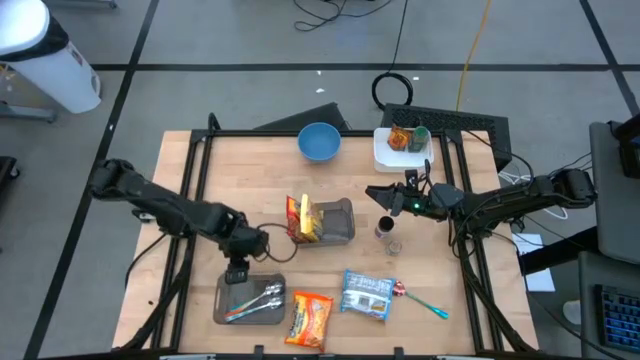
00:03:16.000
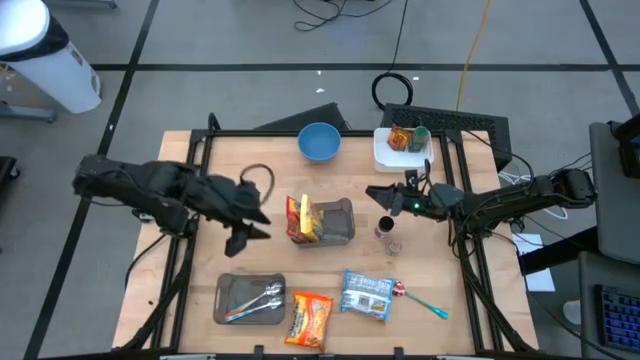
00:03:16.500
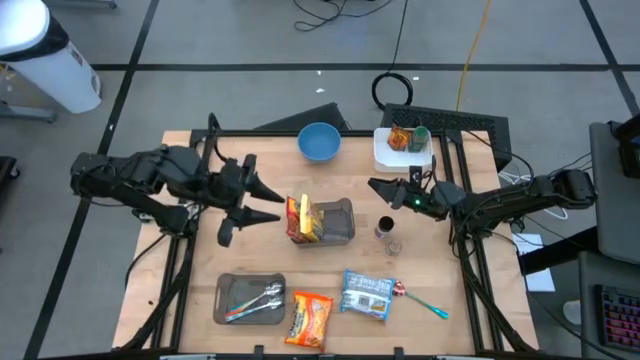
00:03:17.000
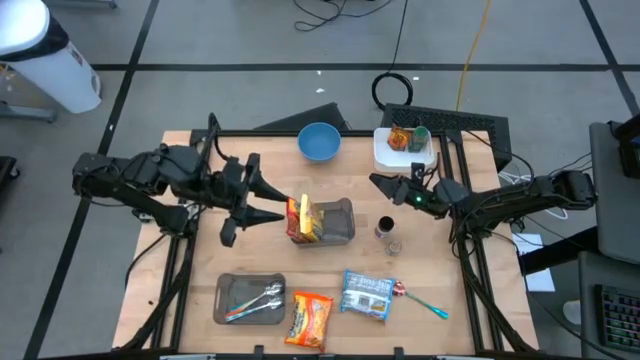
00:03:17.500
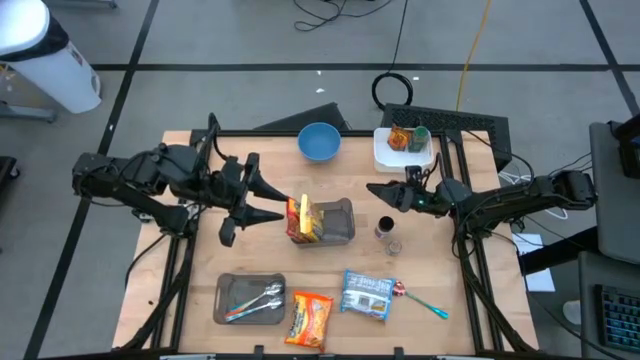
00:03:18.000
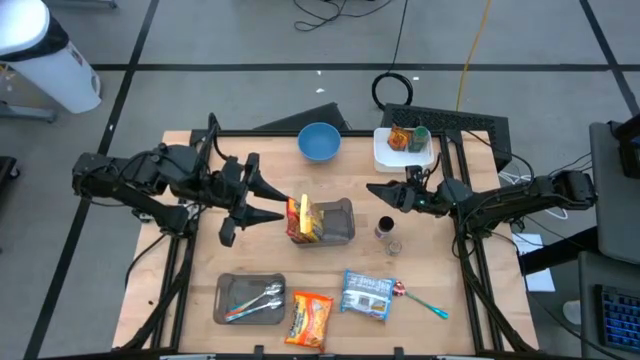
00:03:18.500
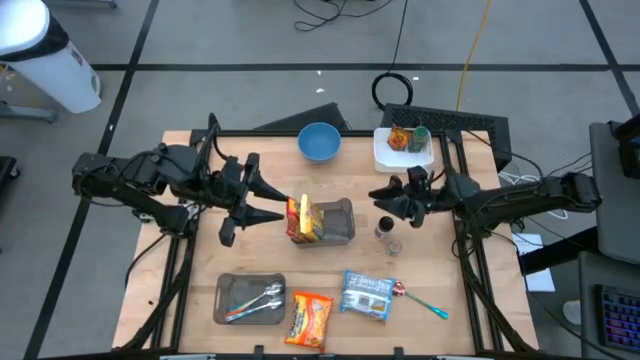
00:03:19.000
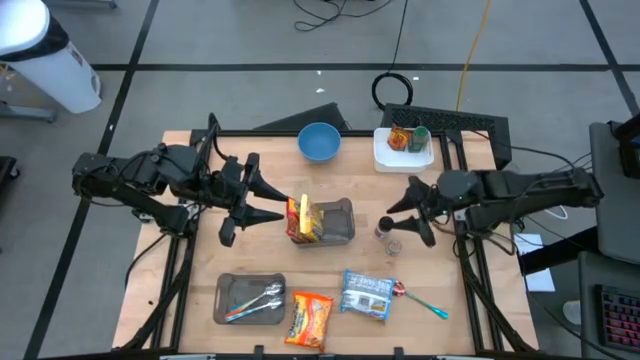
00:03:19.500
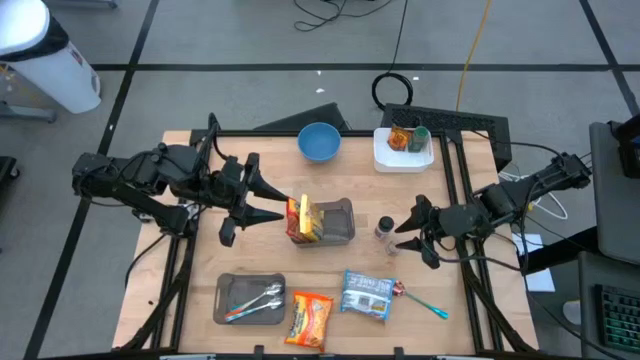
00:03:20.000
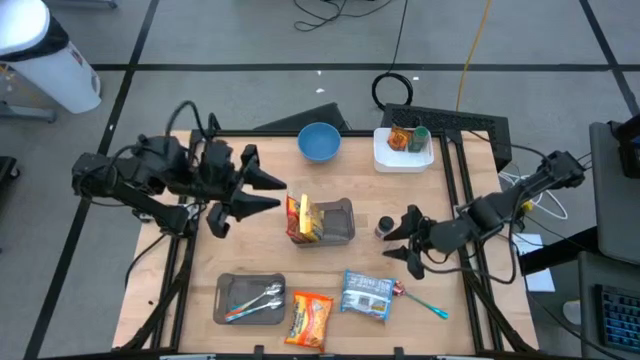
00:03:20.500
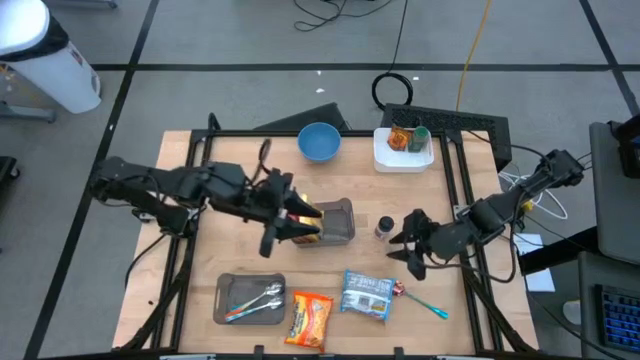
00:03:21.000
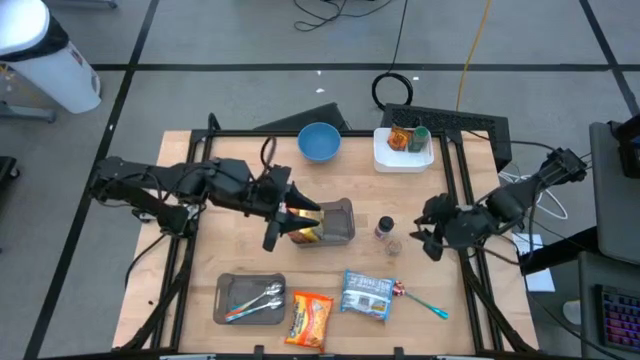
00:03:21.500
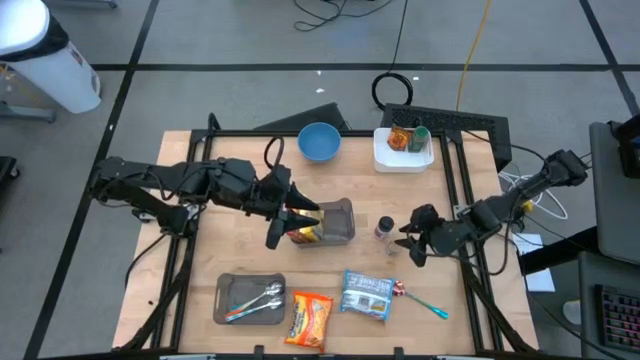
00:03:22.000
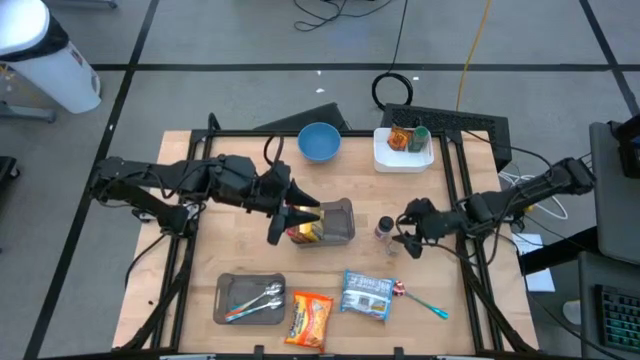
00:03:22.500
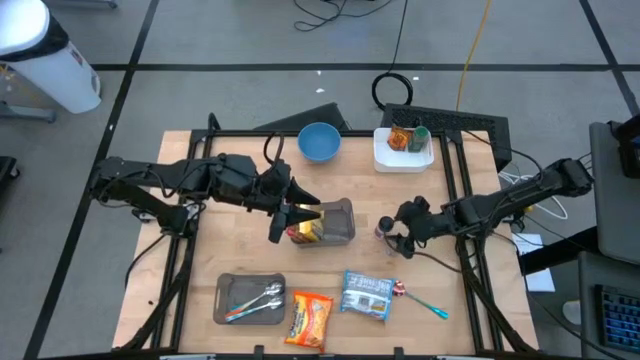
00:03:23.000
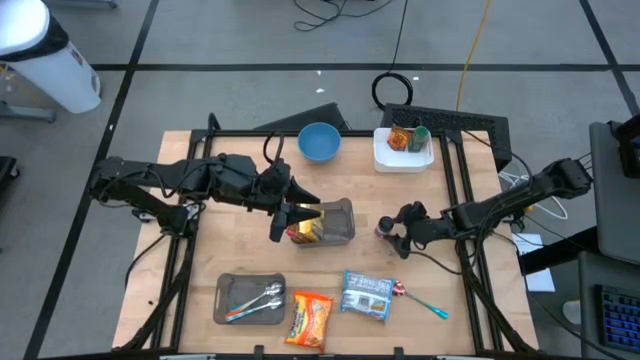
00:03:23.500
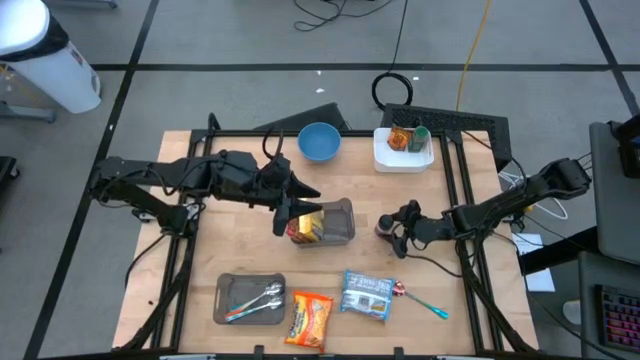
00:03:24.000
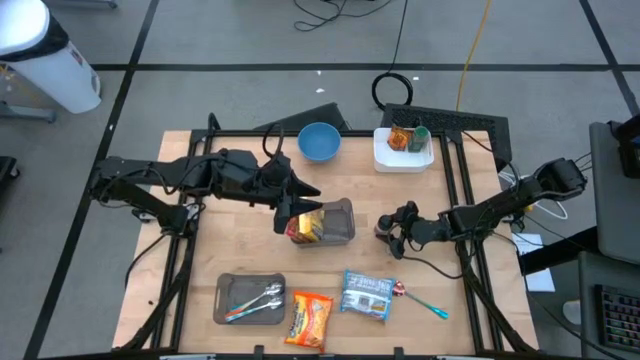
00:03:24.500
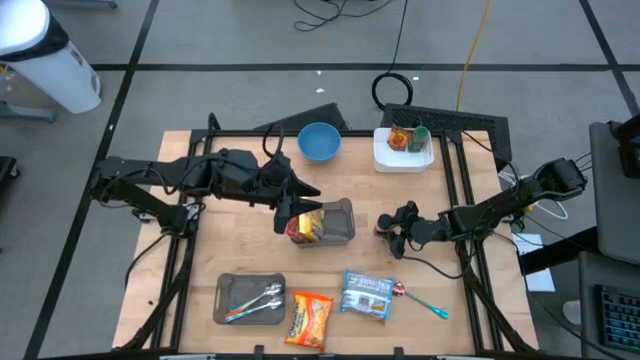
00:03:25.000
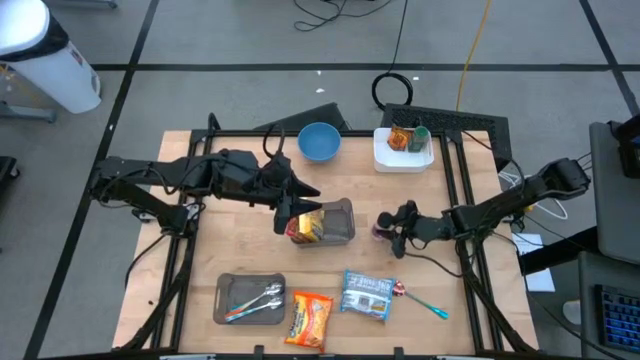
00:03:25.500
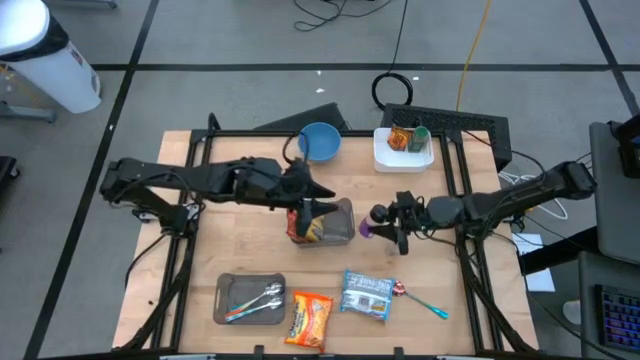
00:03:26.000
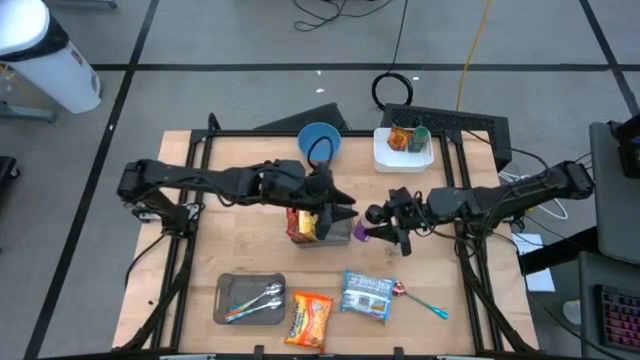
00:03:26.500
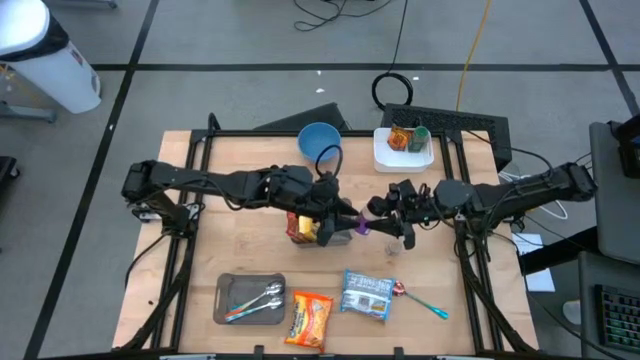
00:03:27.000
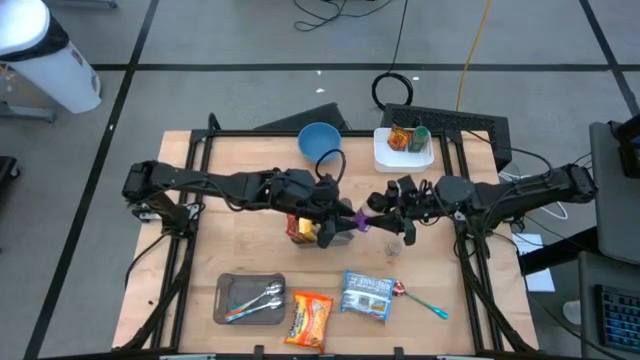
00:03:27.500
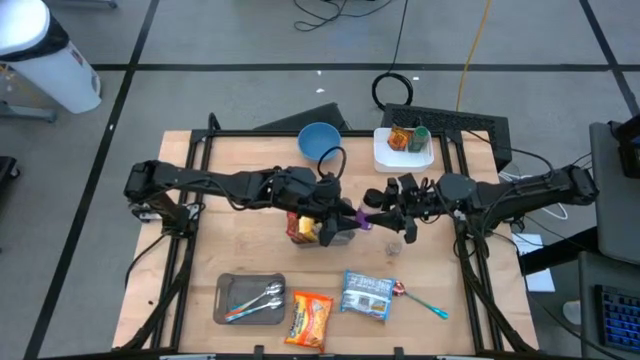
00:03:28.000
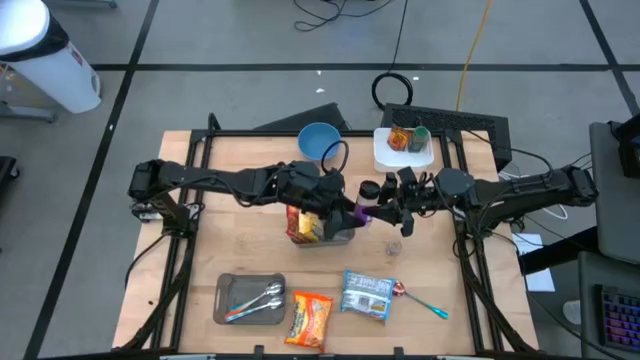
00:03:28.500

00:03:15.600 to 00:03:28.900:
Task: Pick & Place Food Item
Put the purple seasoning bottle into the top white bin

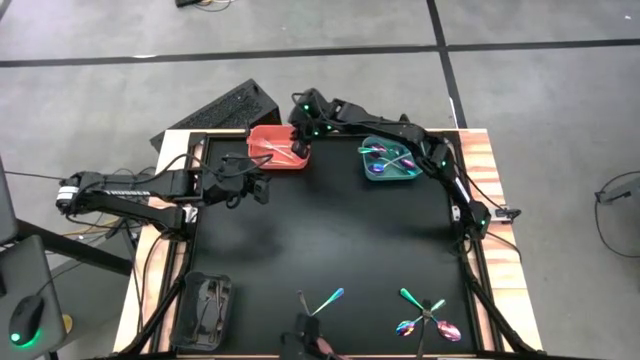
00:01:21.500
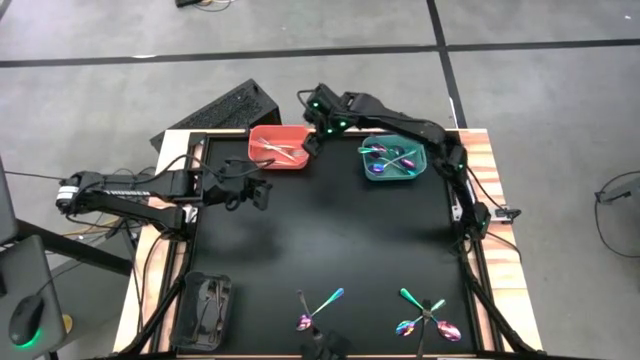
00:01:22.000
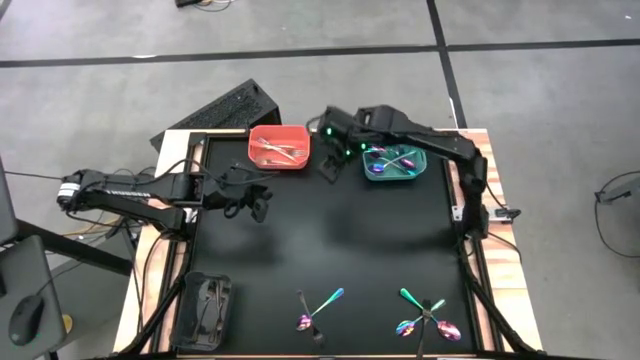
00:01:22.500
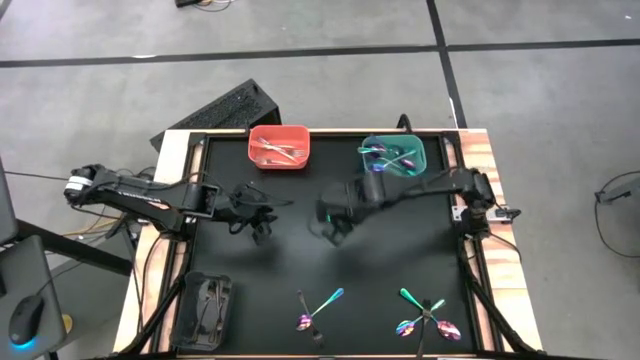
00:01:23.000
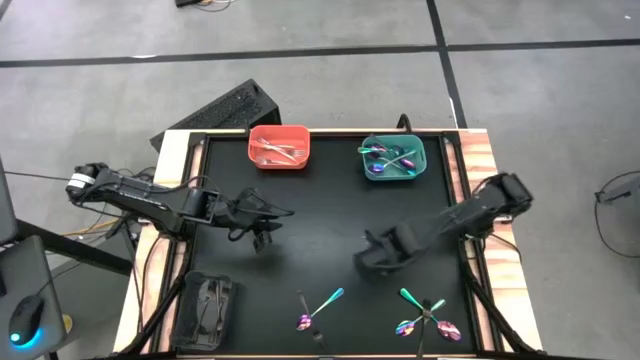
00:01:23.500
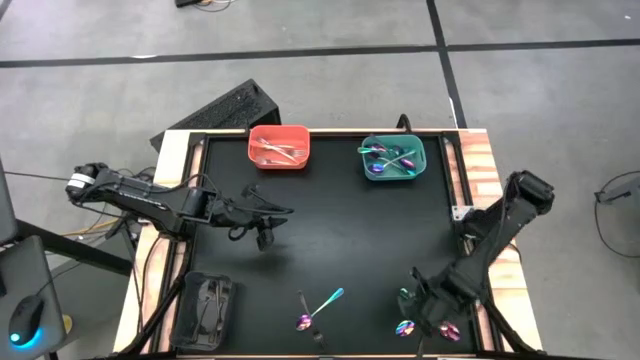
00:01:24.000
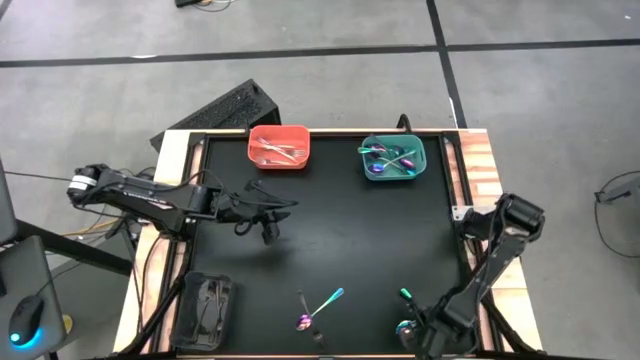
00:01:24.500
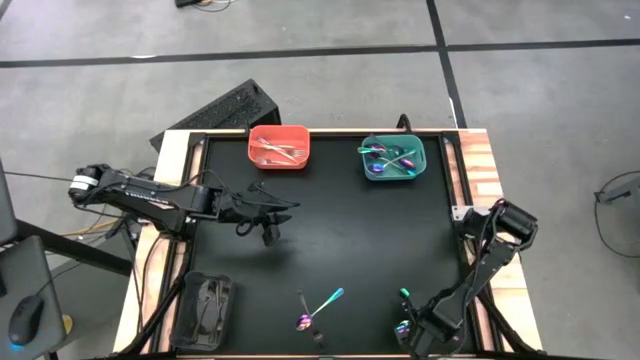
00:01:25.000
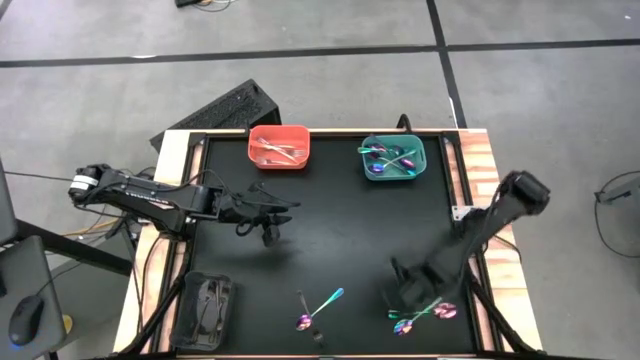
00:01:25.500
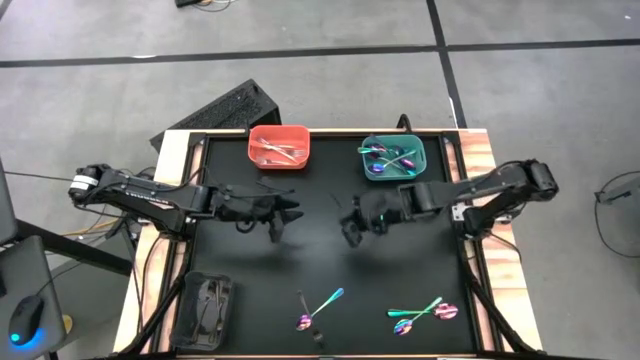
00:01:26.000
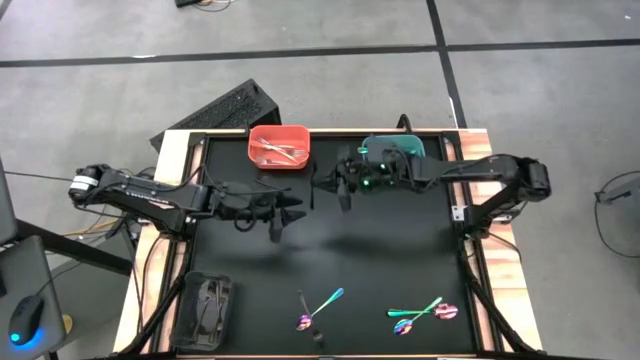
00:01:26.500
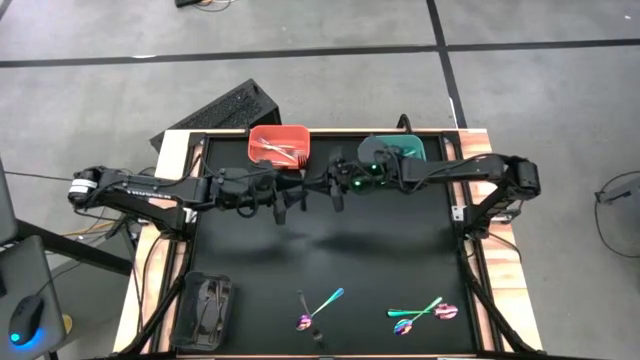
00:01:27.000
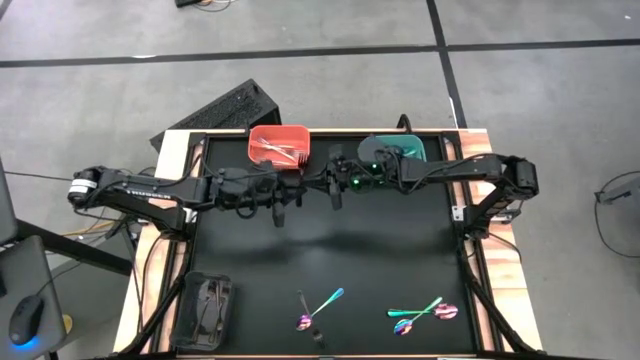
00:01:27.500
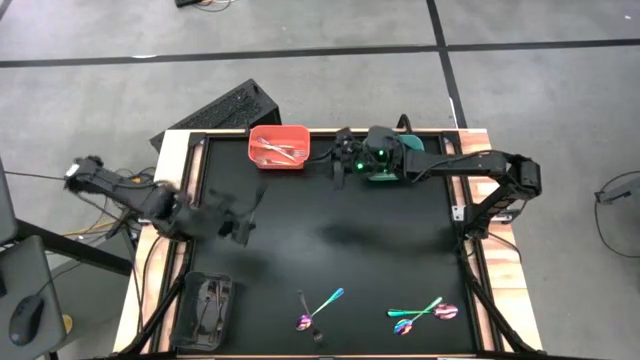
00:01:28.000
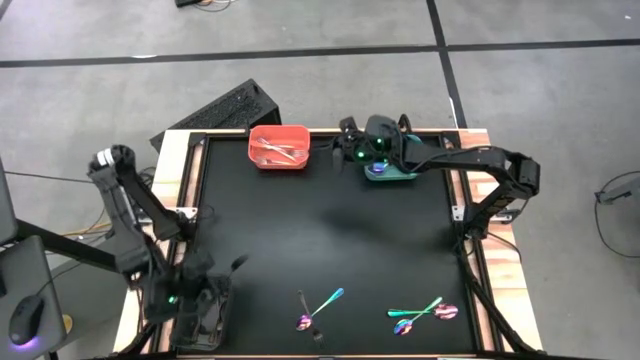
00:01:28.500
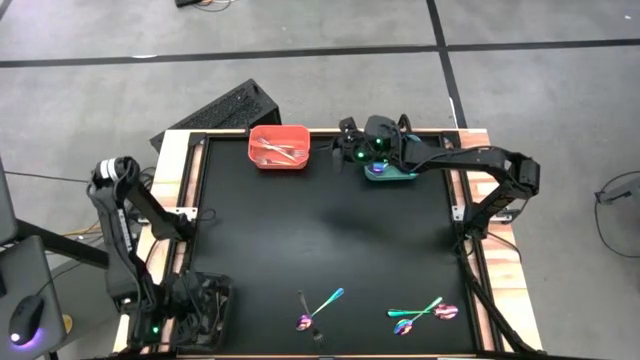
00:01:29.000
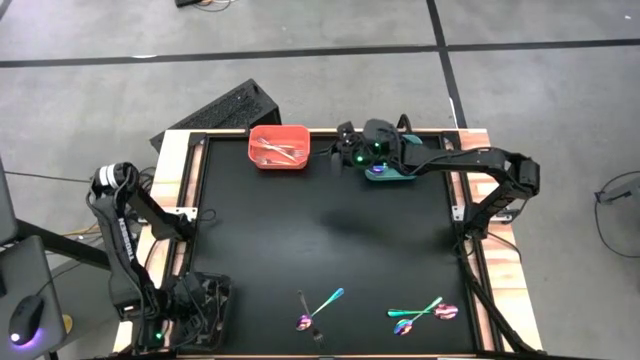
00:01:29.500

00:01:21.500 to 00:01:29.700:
Task: Sort silverware by color (type)
Put the black fork into the black bin
